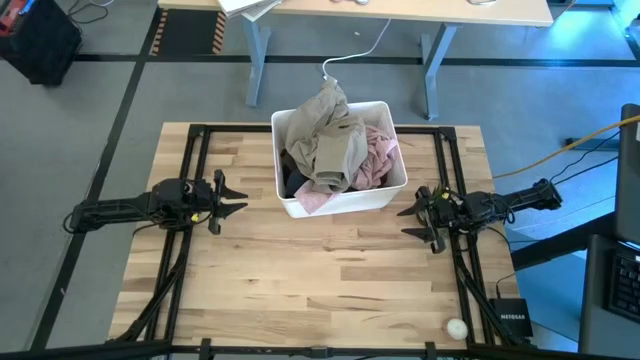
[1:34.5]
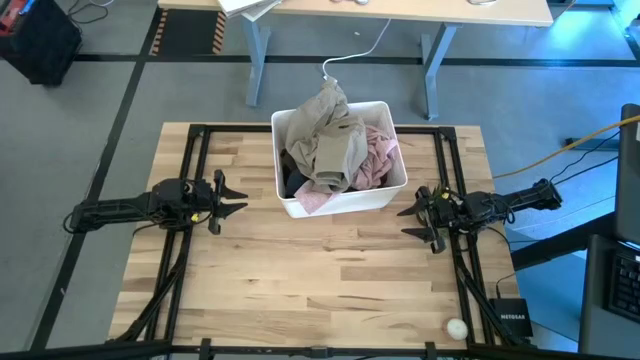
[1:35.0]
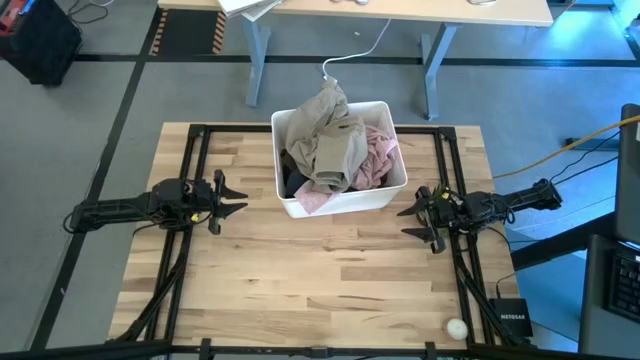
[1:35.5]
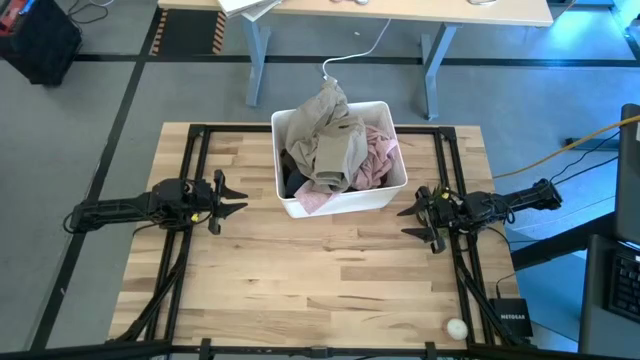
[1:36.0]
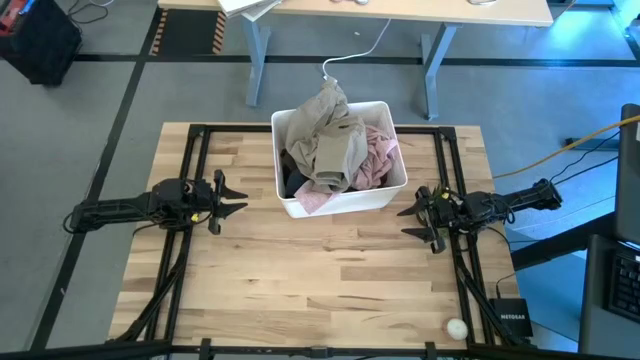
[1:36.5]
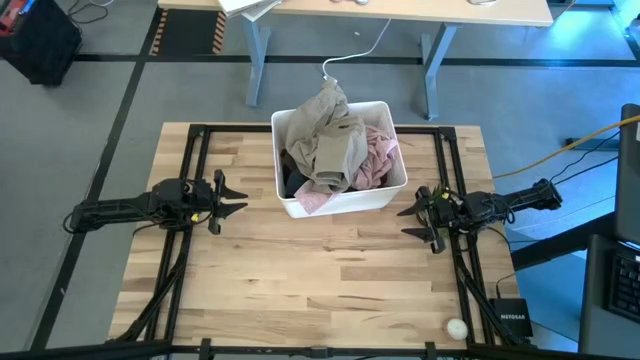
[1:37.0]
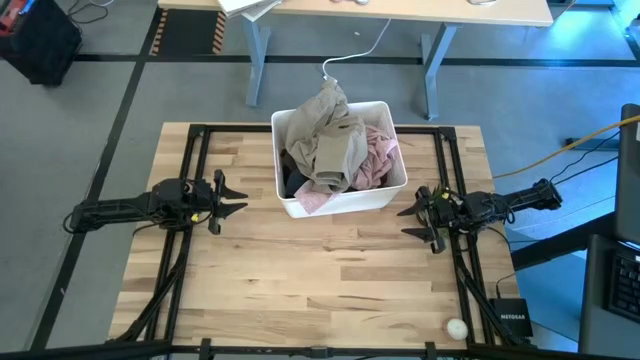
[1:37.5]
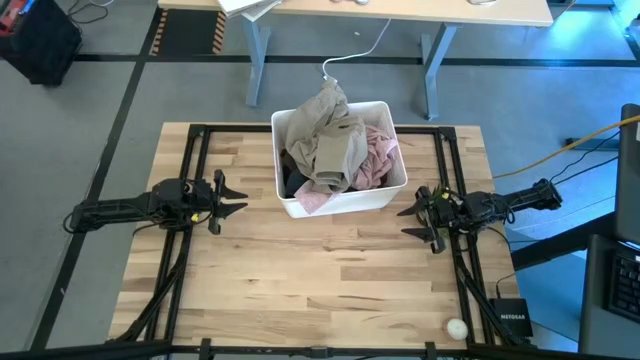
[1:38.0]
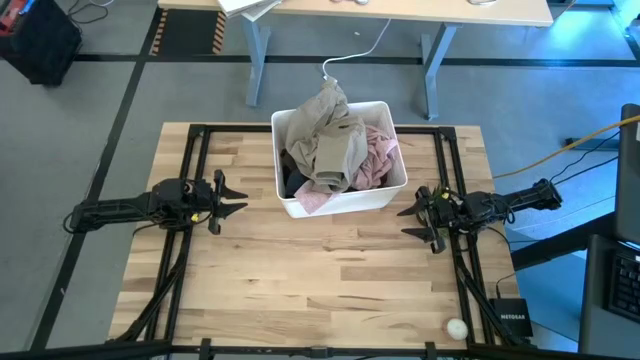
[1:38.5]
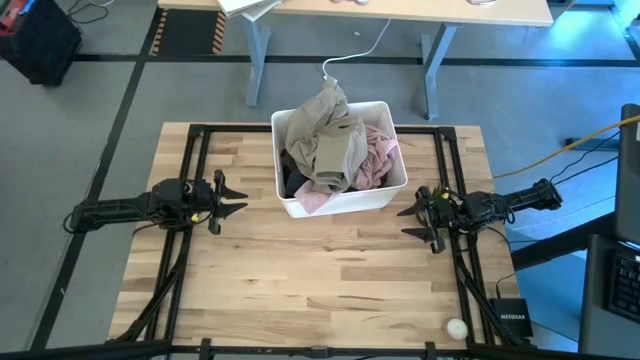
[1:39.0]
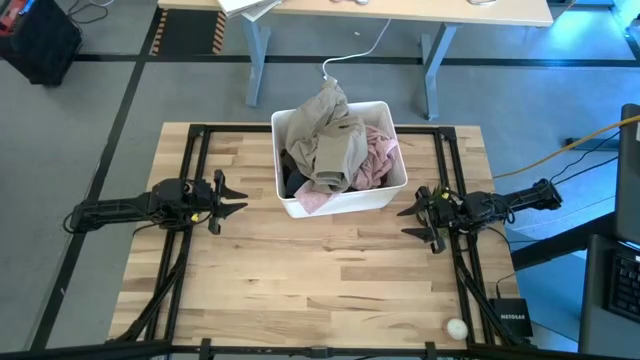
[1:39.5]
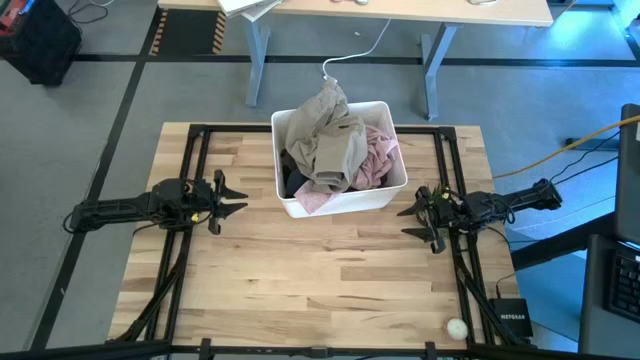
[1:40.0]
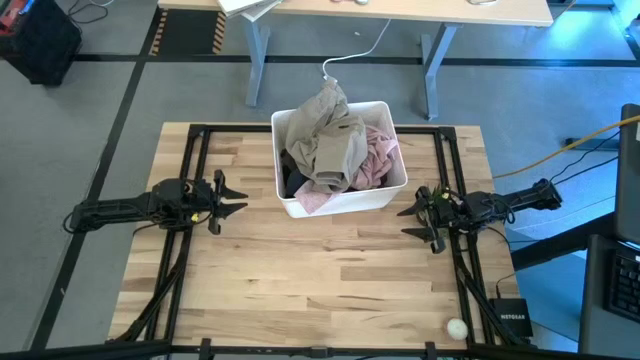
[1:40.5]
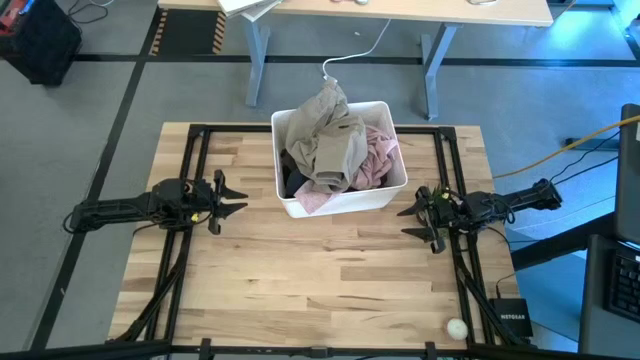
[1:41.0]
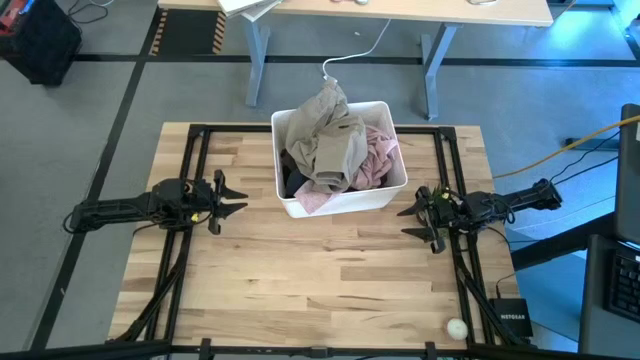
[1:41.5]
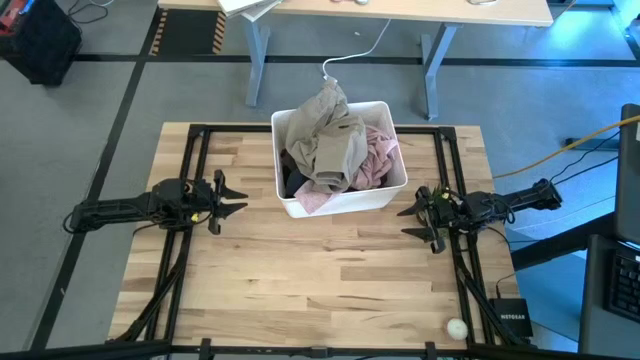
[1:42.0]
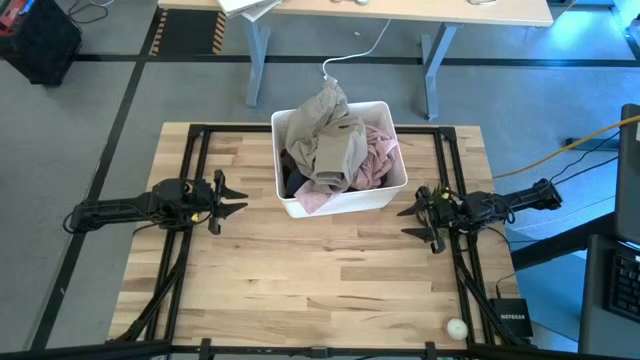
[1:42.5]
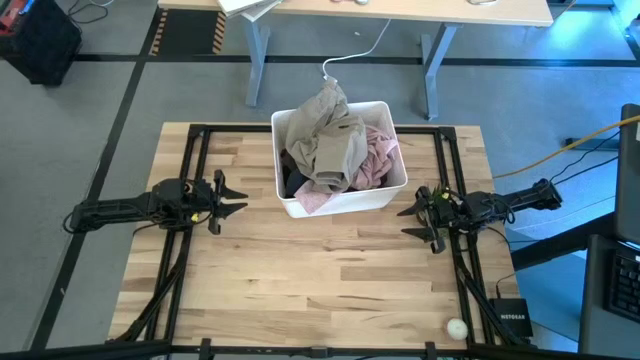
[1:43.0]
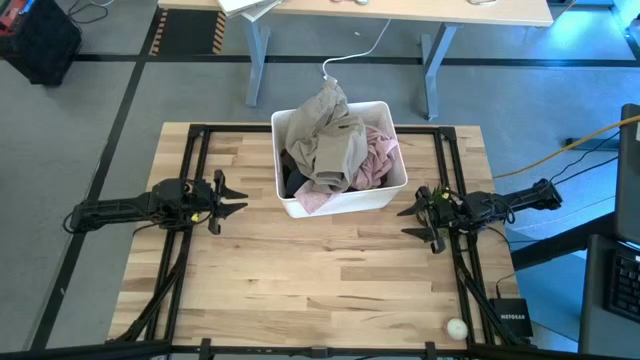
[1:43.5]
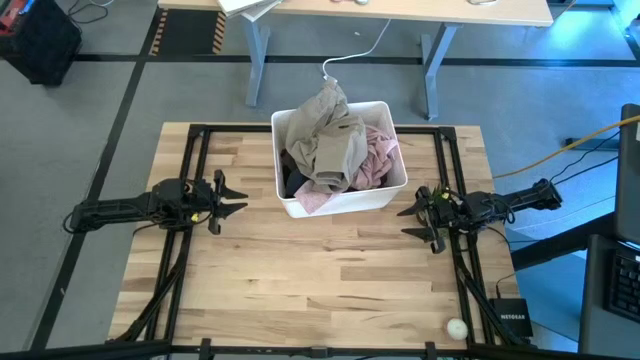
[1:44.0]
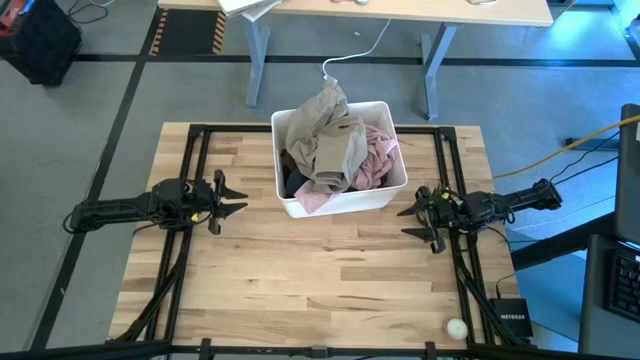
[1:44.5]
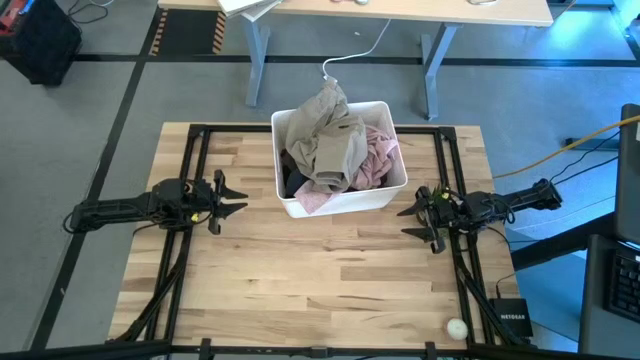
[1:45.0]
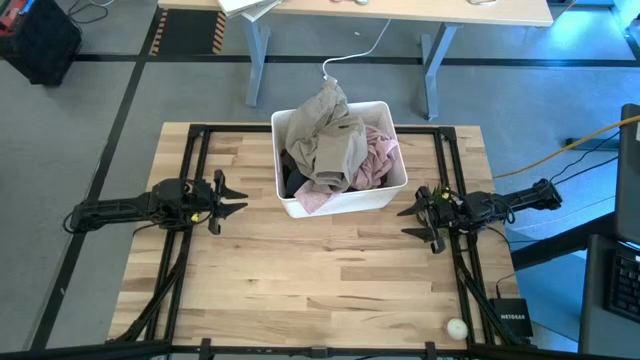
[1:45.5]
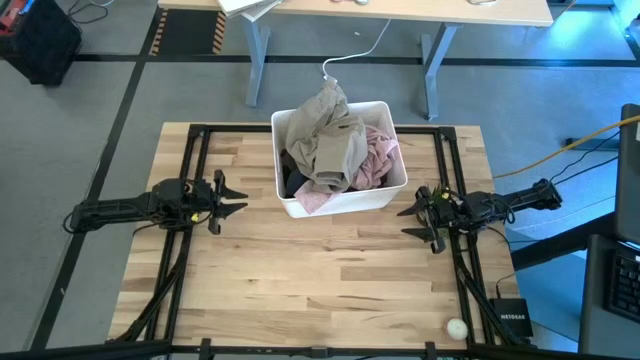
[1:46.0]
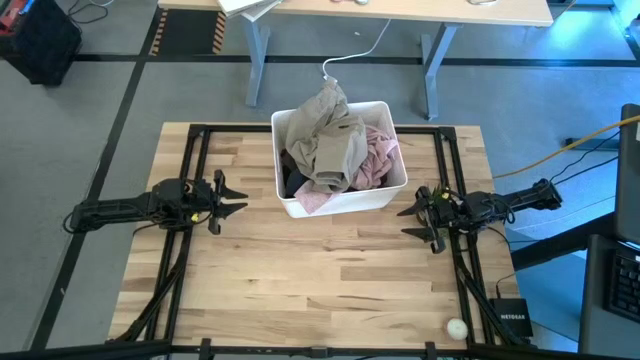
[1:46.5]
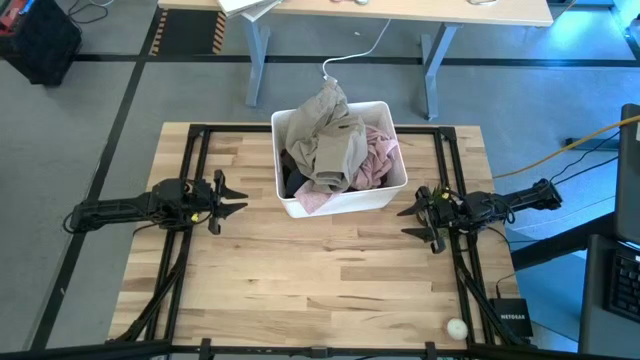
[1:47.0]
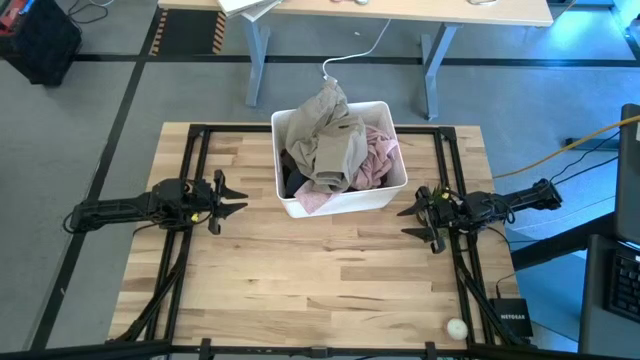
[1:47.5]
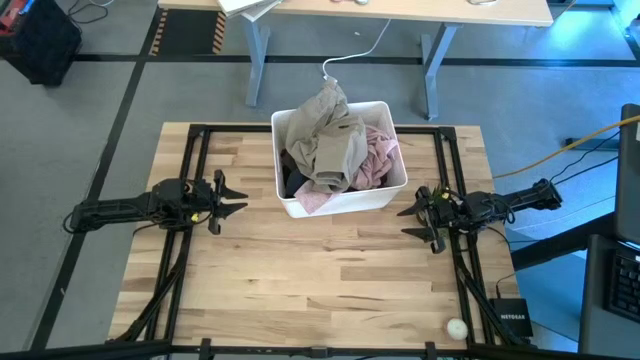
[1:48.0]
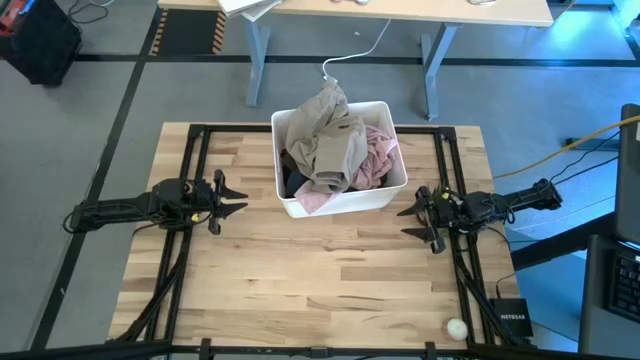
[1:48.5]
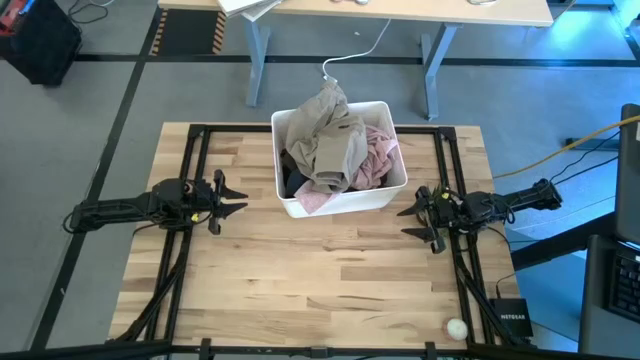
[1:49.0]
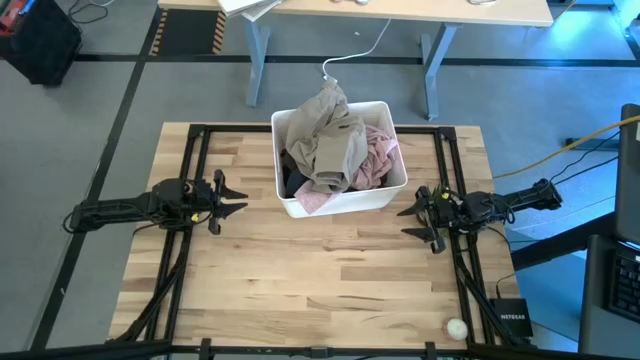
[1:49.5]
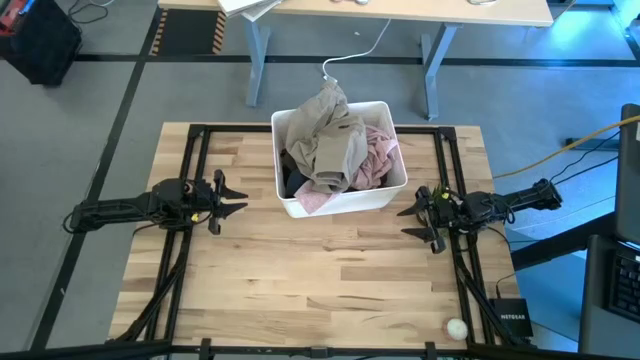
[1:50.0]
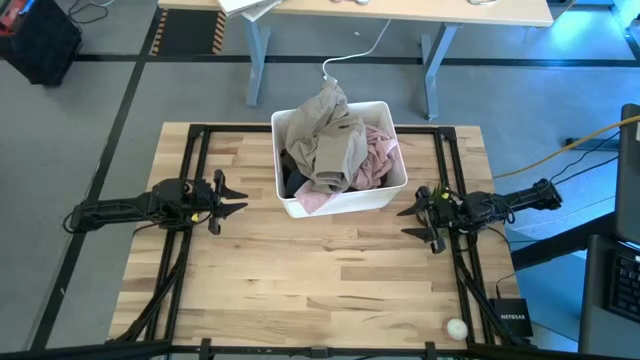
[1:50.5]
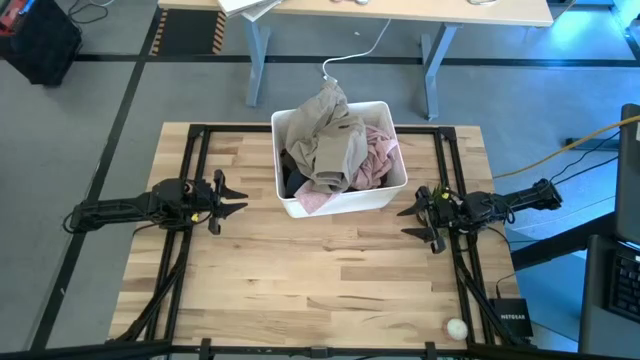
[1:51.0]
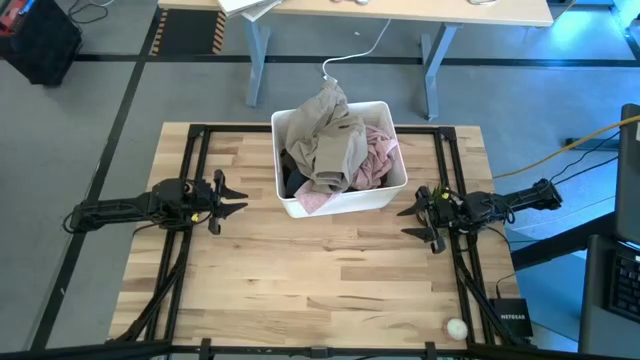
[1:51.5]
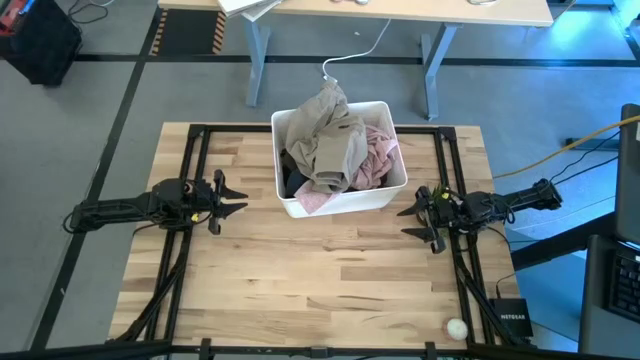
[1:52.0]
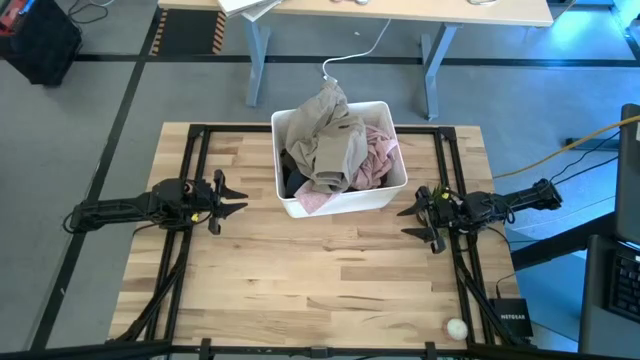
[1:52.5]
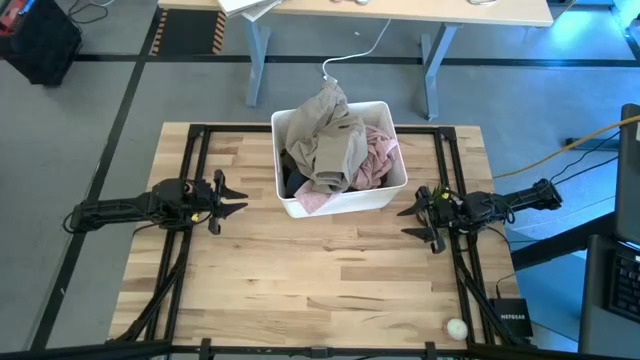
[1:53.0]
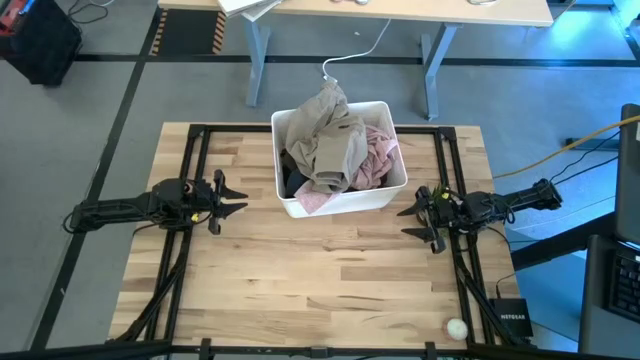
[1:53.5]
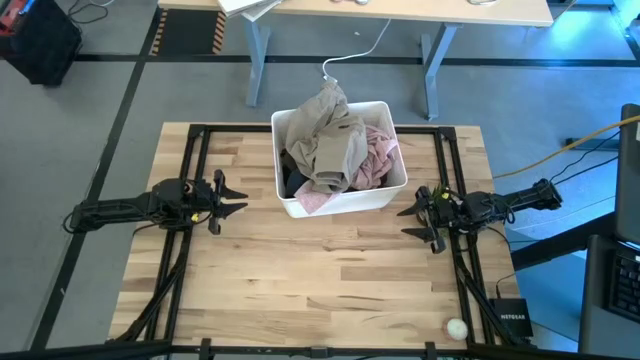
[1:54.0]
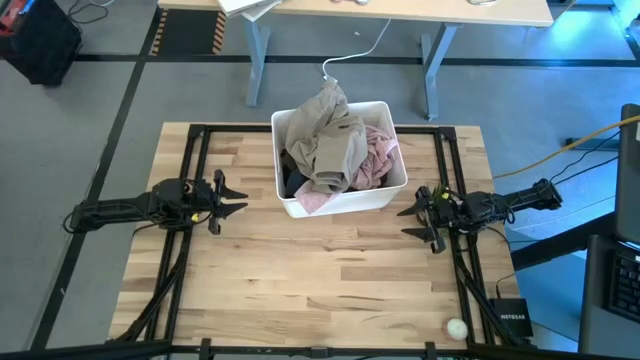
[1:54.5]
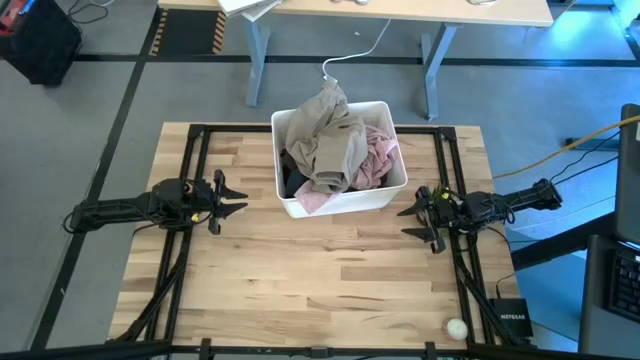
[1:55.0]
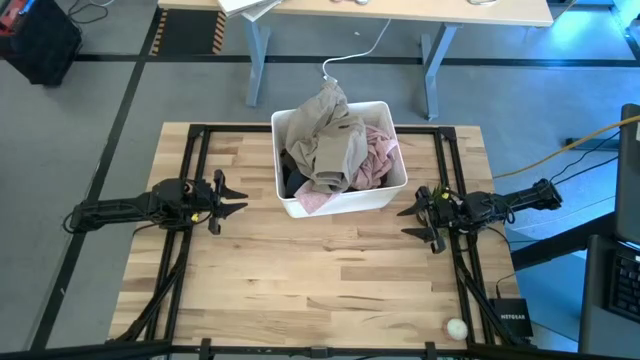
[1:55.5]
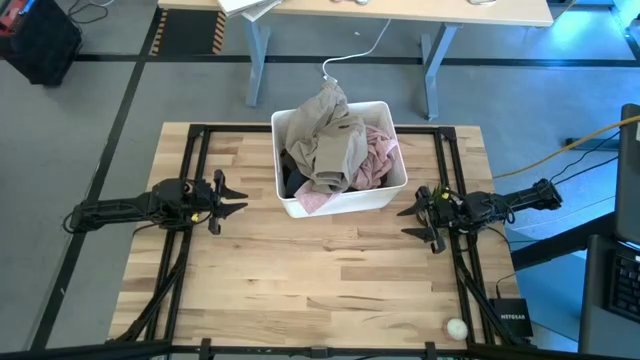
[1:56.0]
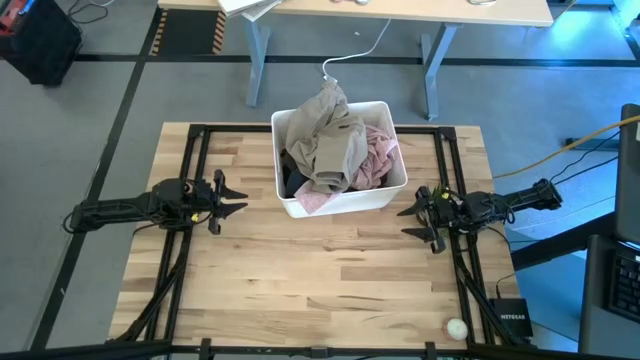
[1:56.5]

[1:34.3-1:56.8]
Task: Sort clothes
Return to Home Position
